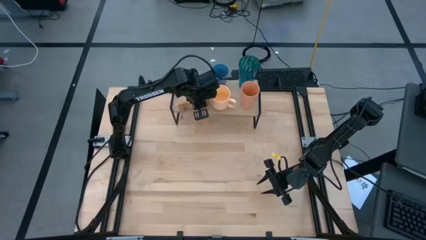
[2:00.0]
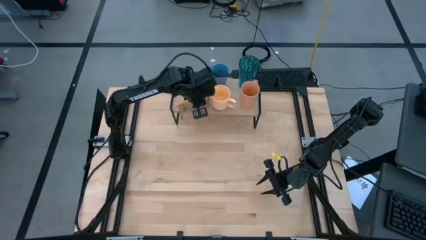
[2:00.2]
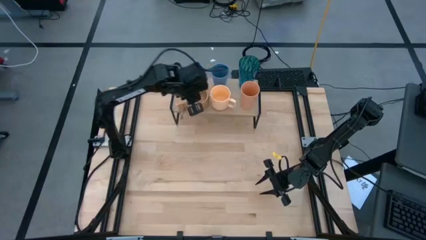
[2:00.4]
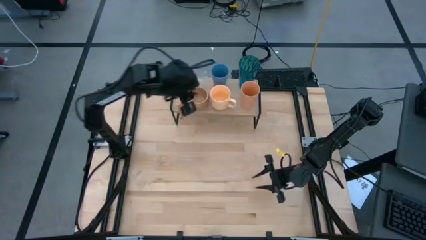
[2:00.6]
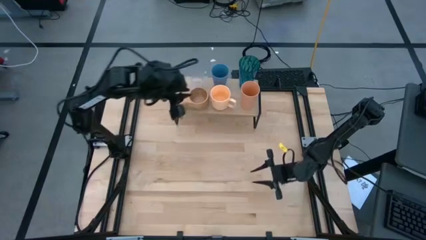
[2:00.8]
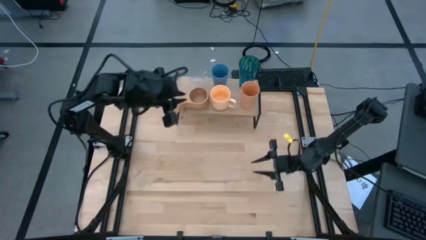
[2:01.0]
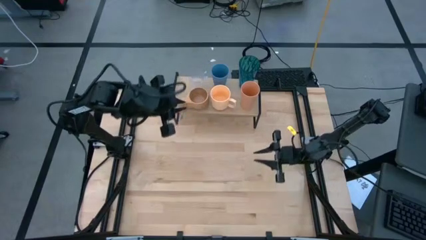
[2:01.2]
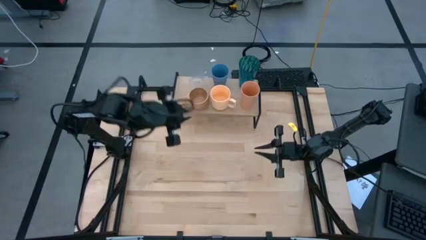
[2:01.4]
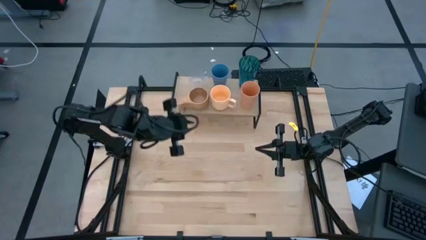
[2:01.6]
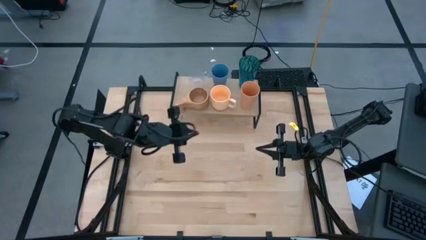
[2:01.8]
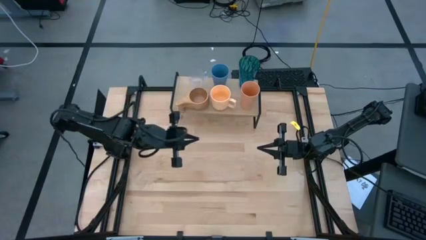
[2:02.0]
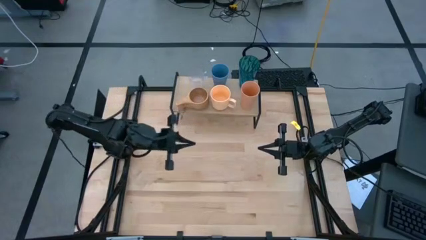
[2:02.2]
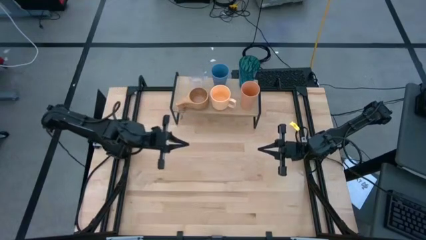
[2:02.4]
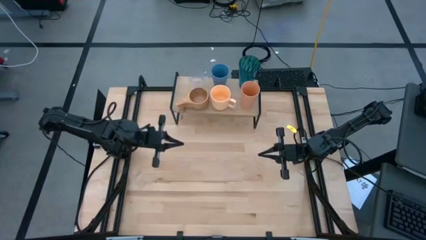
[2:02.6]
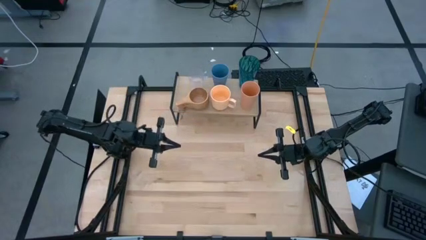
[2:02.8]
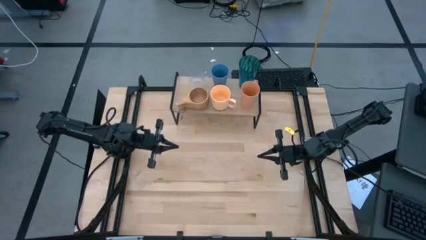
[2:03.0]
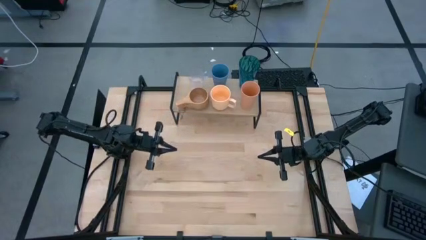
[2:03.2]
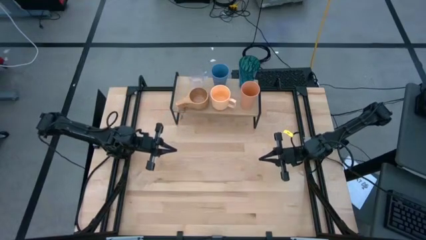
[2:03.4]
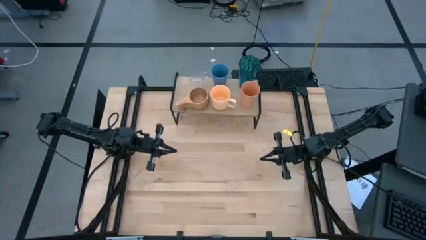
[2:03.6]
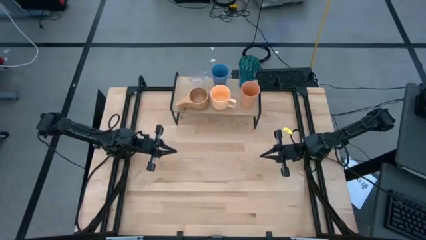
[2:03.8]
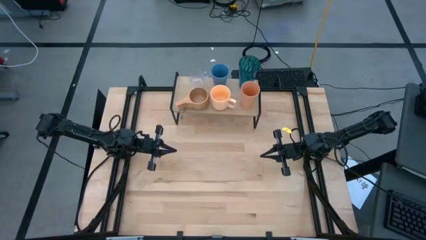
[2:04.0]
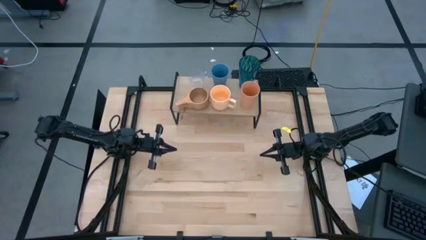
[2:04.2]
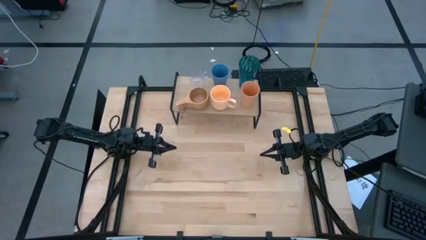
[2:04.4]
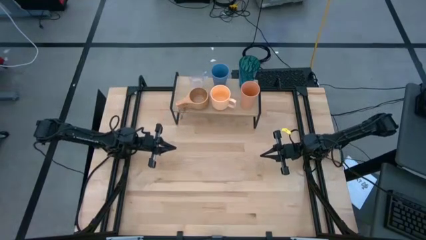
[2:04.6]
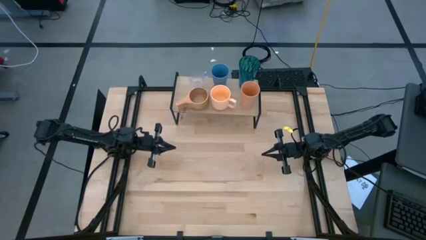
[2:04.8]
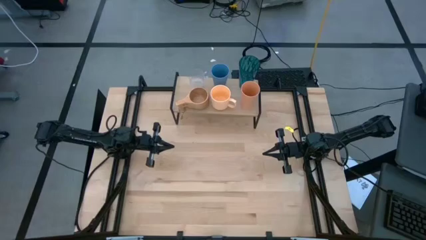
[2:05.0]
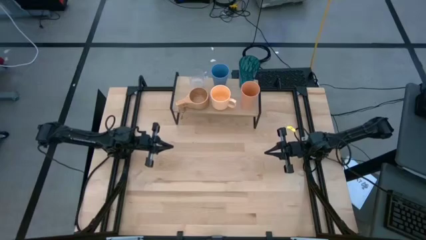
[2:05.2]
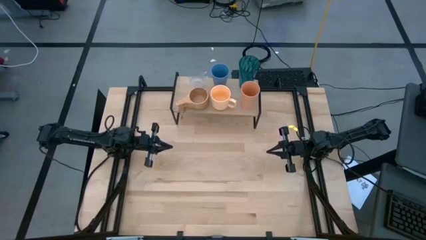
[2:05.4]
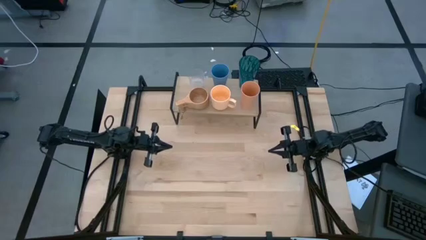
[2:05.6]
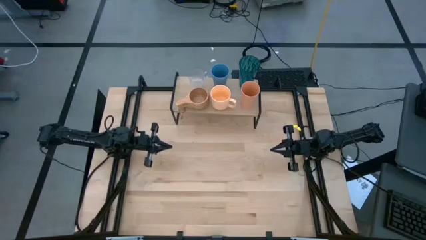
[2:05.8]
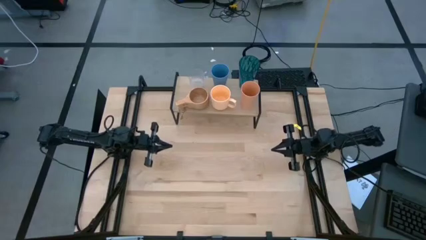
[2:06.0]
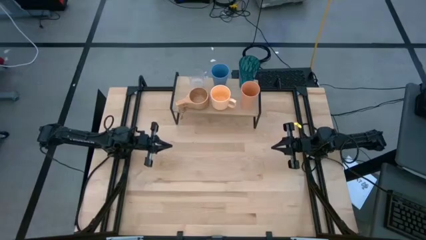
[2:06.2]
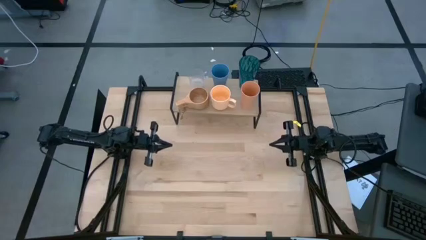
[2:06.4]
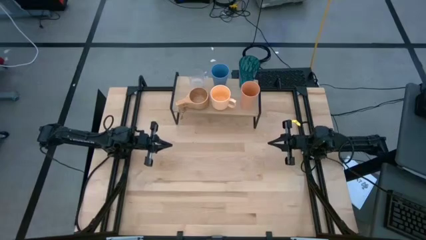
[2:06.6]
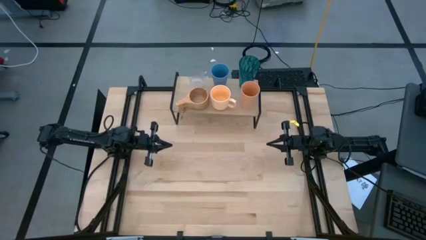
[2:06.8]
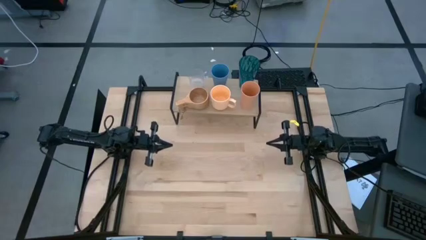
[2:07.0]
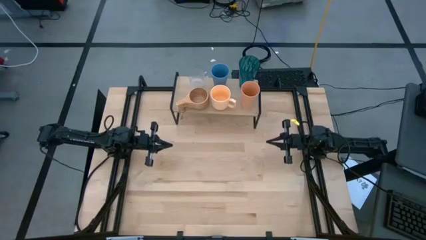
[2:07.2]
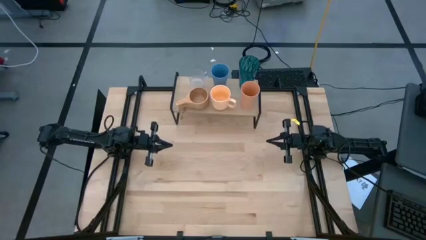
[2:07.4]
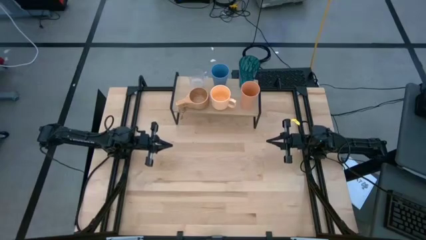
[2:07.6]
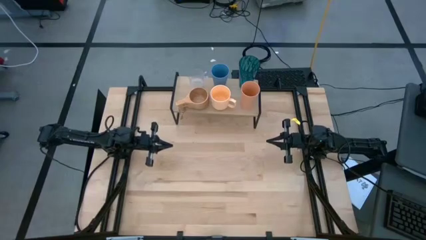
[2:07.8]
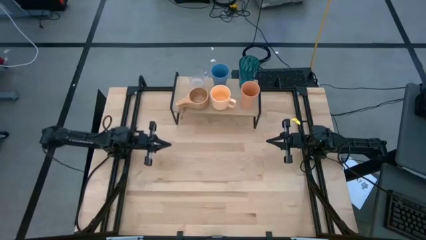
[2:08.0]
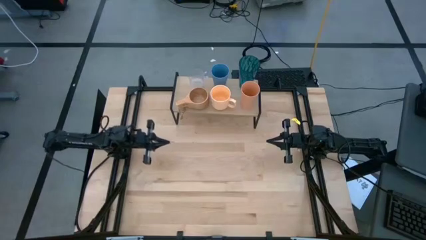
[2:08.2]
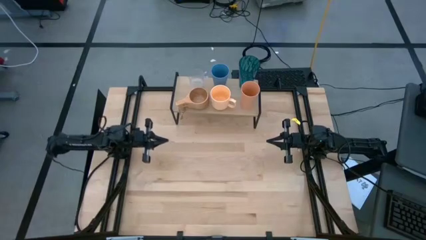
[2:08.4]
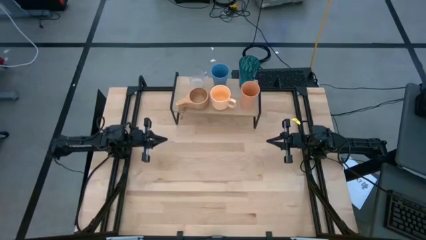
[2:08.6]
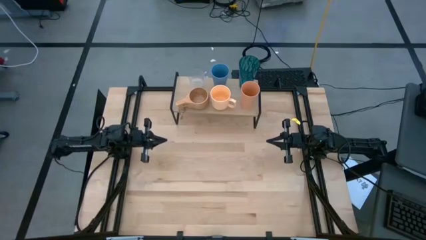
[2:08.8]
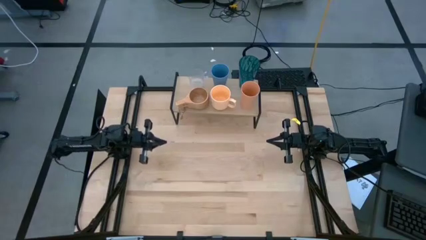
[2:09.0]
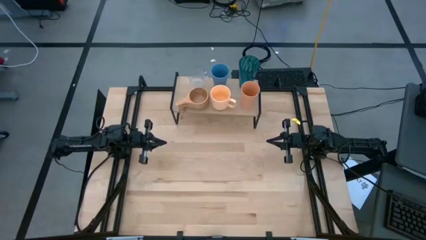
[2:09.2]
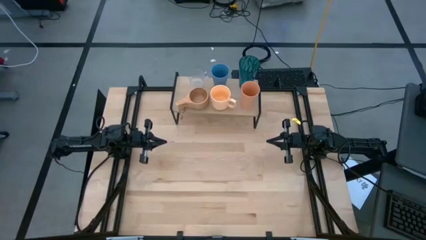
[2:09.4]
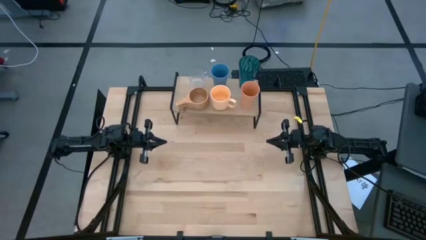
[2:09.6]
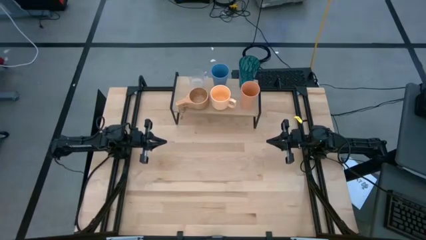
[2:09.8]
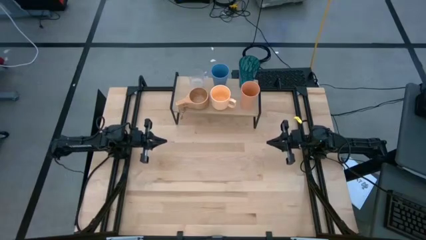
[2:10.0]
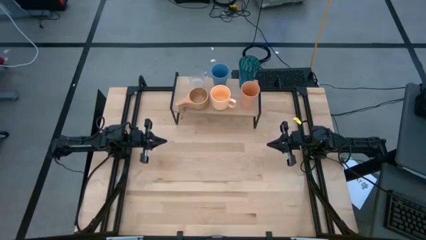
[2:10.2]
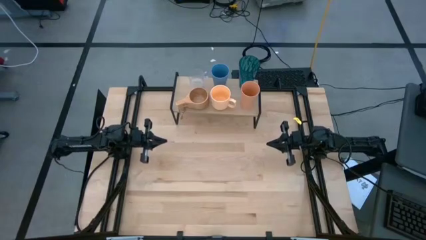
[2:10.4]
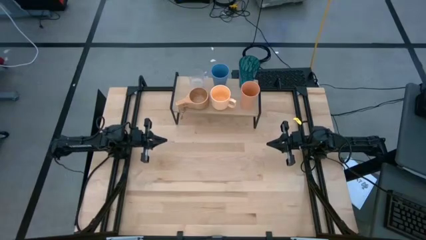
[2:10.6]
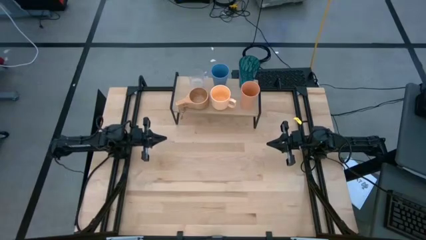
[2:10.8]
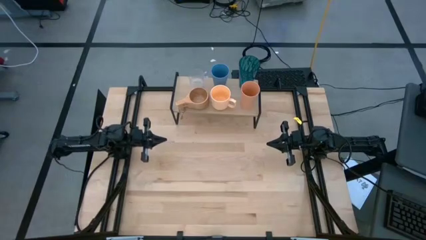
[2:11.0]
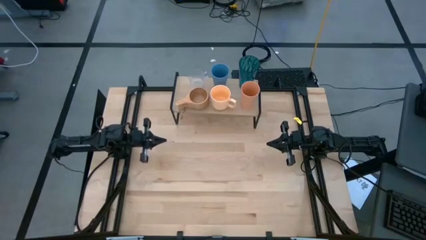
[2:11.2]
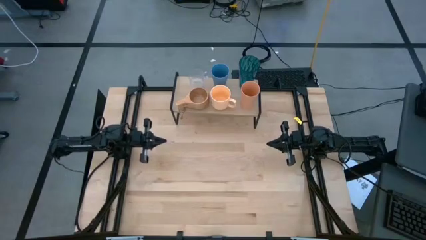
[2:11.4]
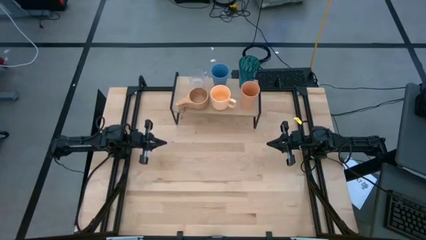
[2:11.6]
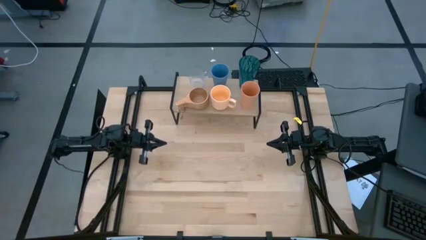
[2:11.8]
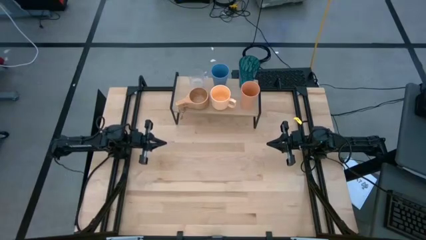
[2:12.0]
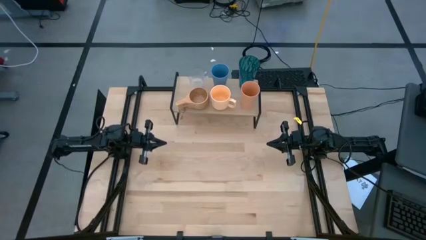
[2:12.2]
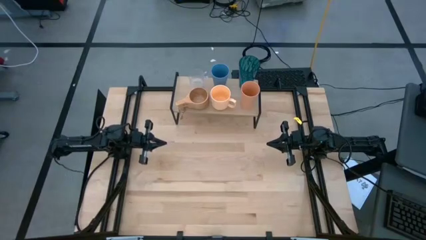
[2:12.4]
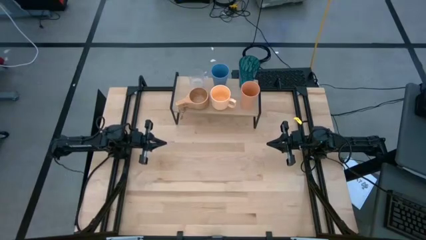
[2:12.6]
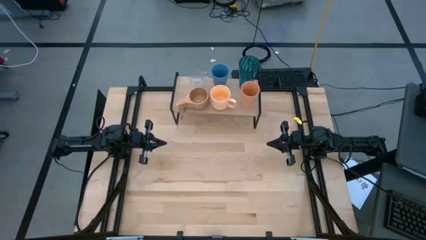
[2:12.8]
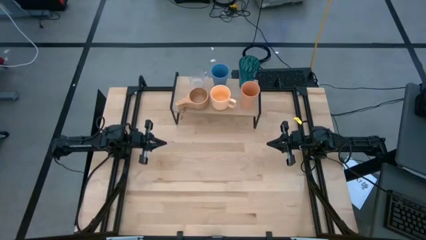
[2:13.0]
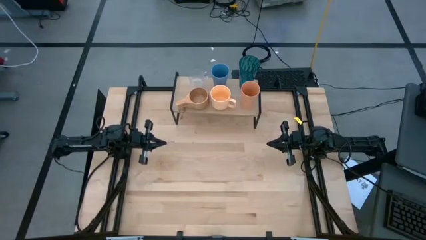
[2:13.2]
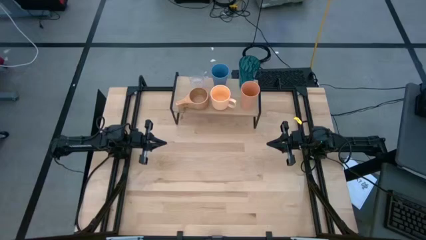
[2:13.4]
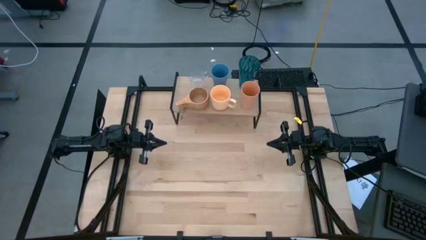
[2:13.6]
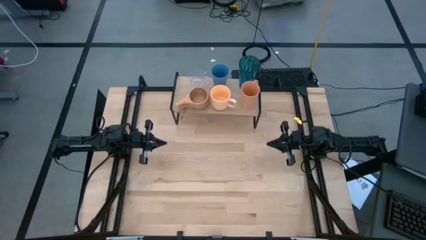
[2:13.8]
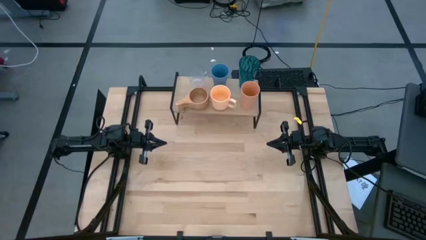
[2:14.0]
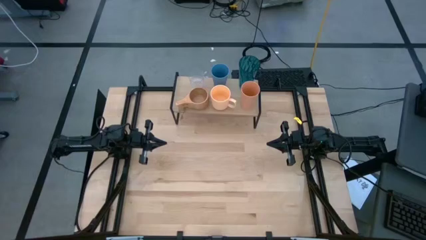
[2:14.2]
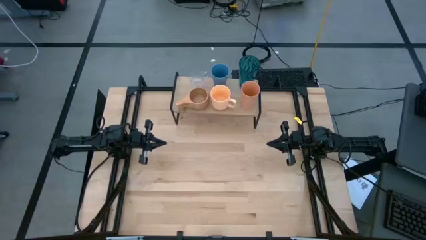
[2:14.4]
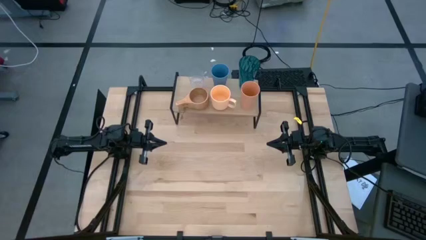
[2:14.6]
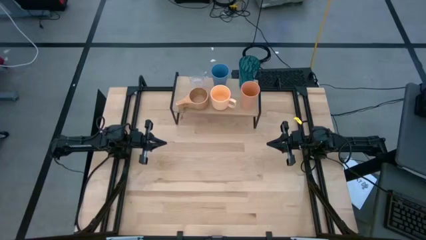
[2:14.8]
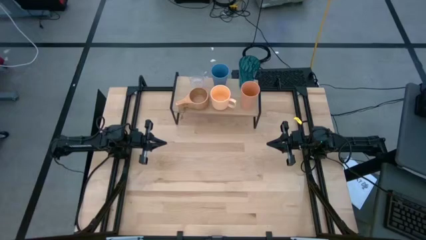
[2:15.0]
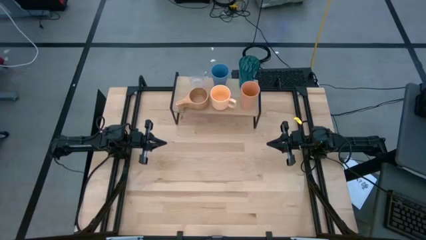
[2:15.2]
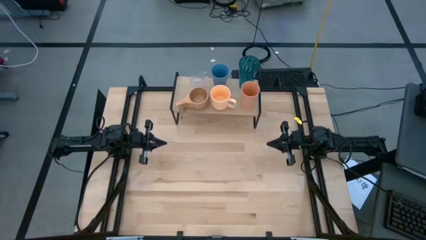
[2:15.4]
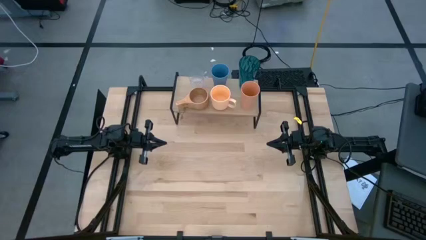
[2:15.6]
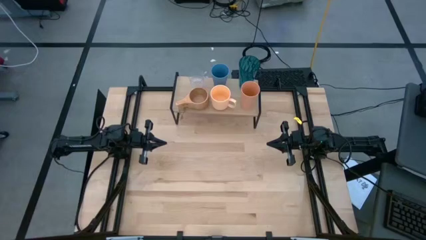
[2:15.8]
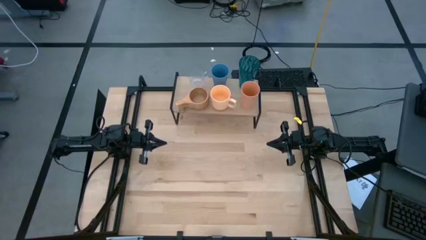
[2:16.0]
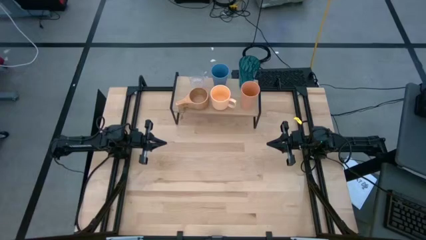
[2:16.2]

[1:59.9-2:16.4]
Task: Stack small to large cups/mugs on shelf
Return to Home Position
